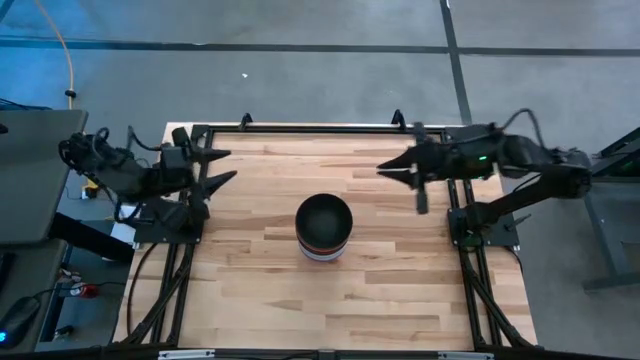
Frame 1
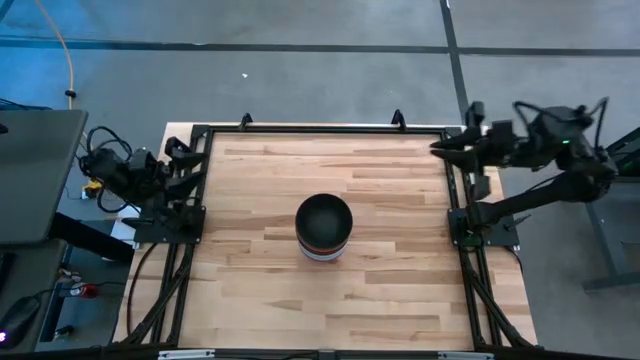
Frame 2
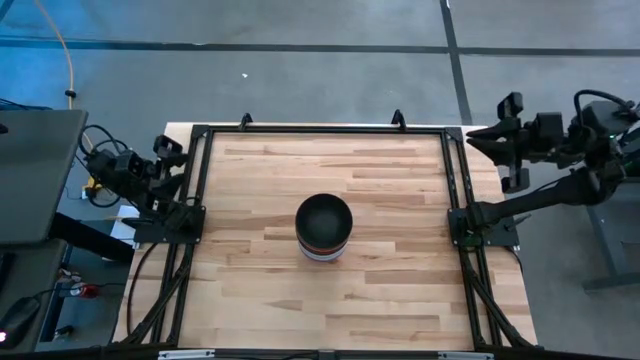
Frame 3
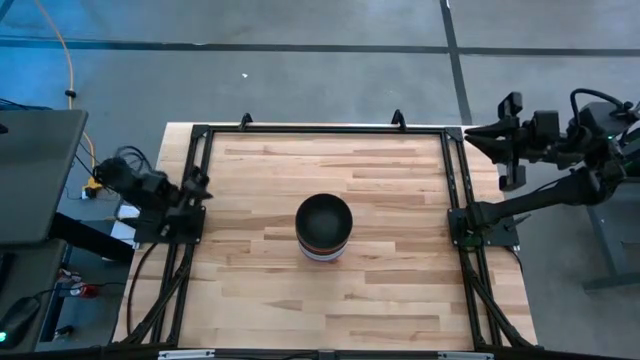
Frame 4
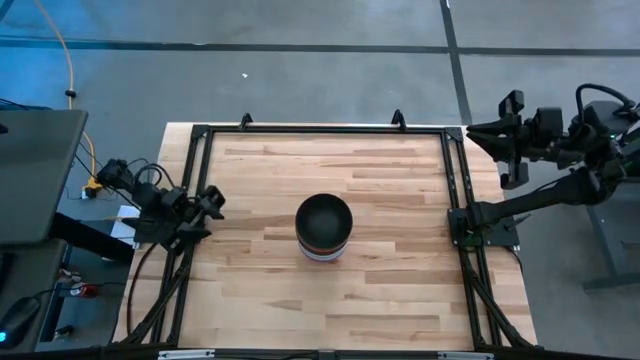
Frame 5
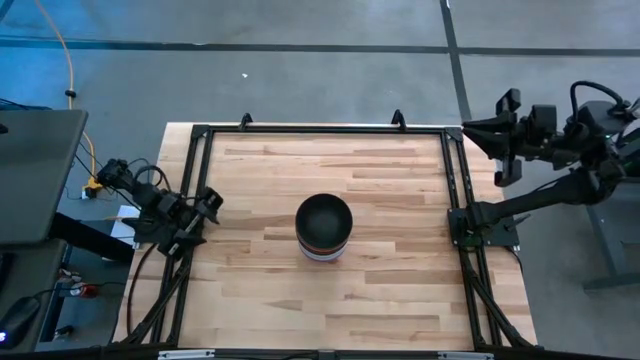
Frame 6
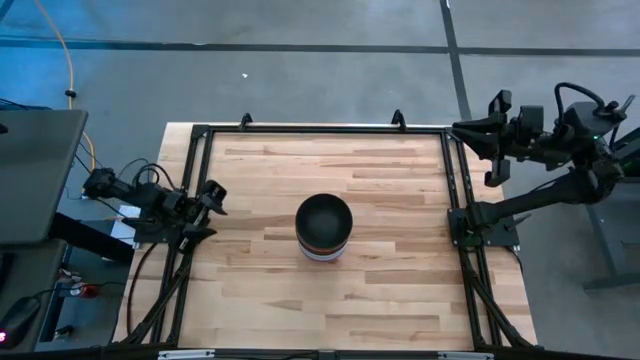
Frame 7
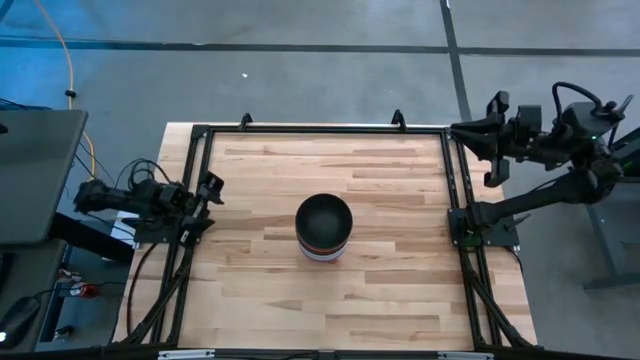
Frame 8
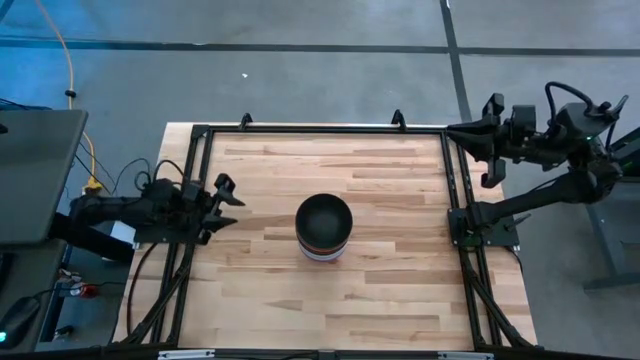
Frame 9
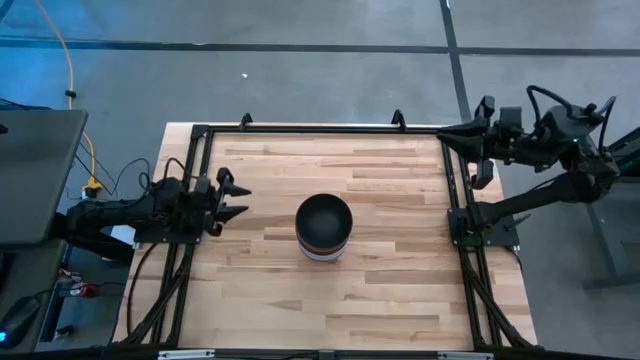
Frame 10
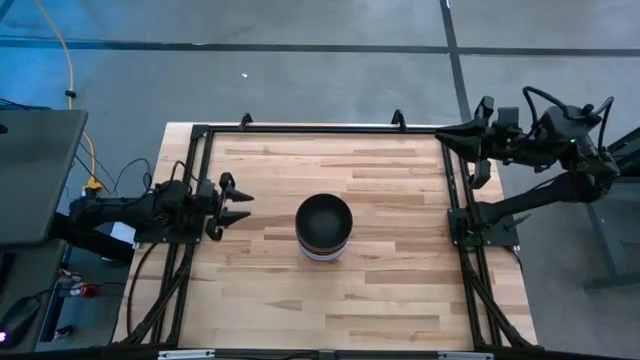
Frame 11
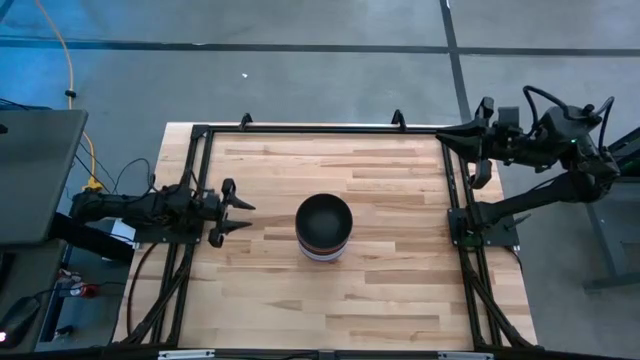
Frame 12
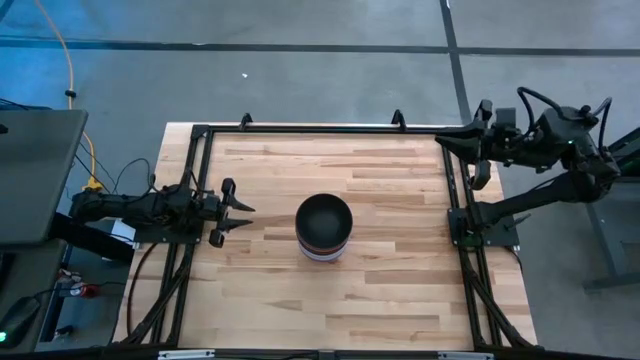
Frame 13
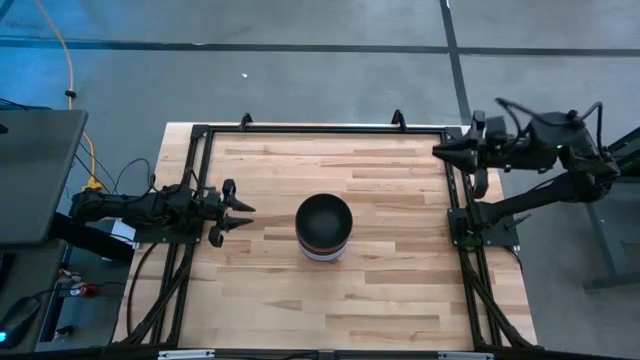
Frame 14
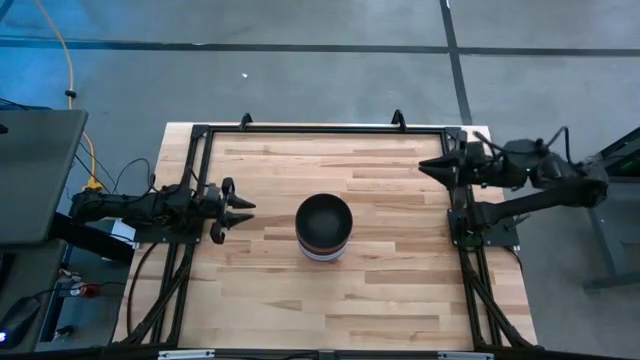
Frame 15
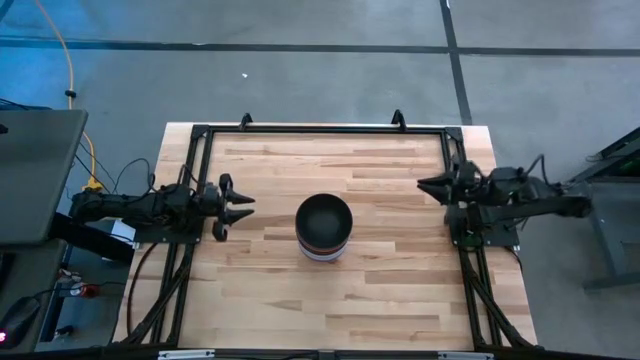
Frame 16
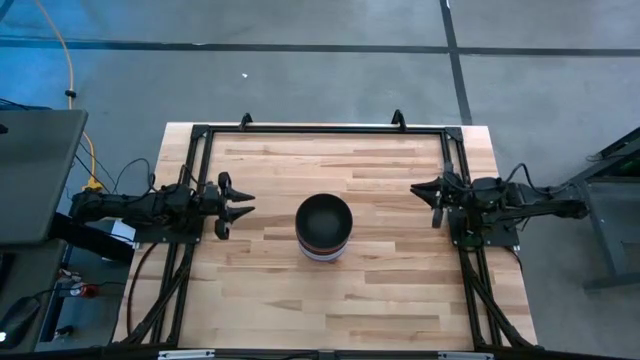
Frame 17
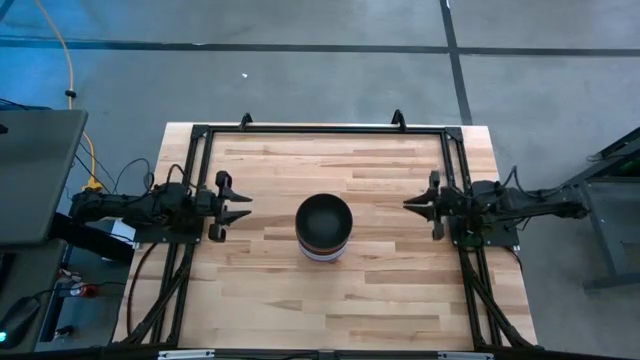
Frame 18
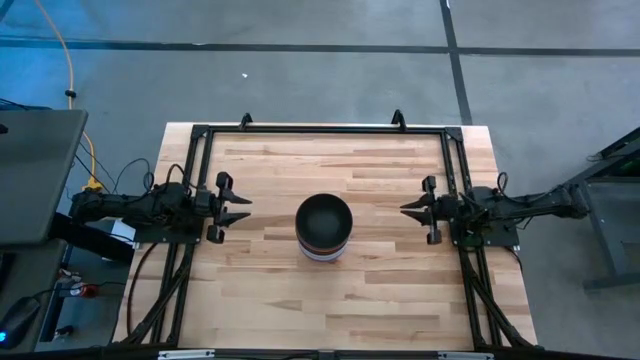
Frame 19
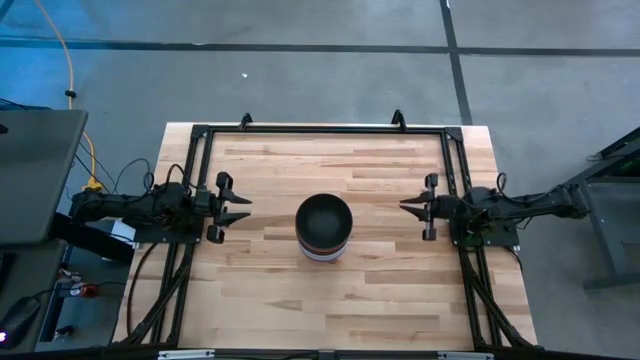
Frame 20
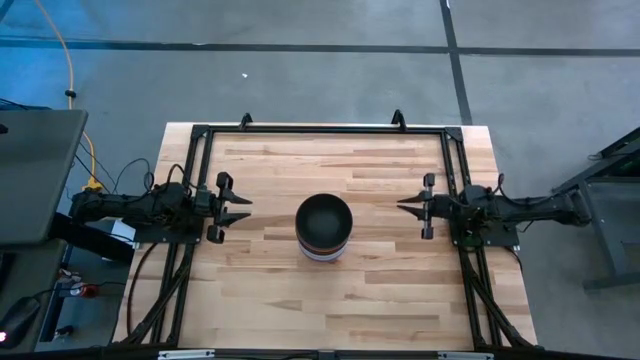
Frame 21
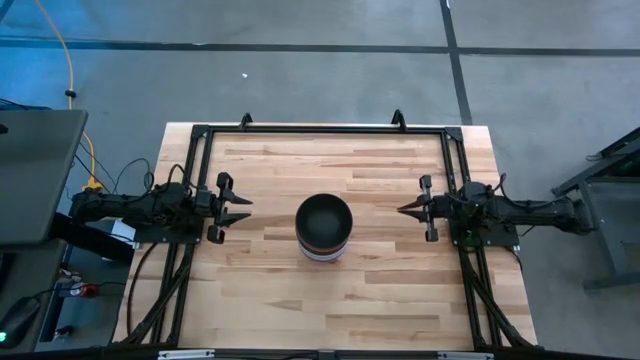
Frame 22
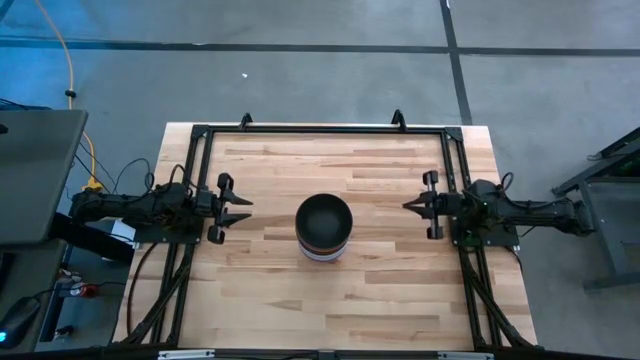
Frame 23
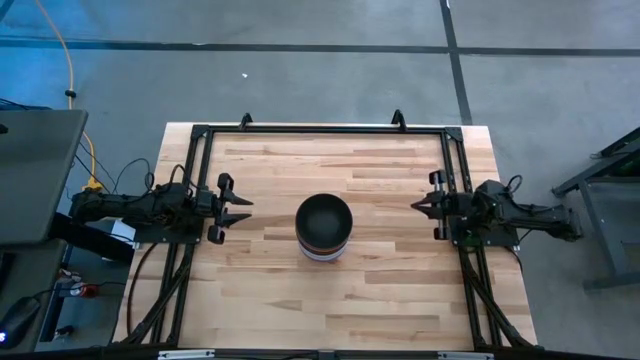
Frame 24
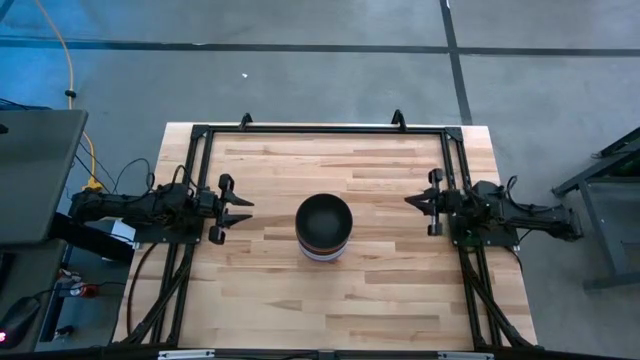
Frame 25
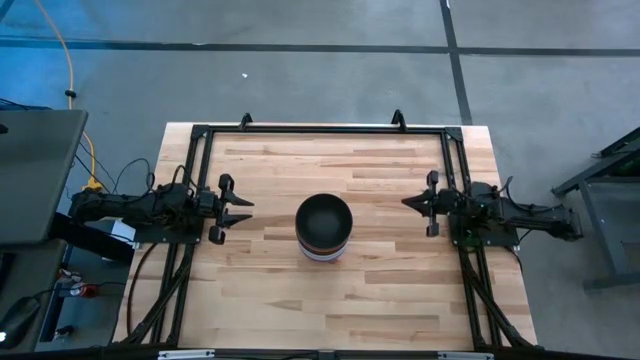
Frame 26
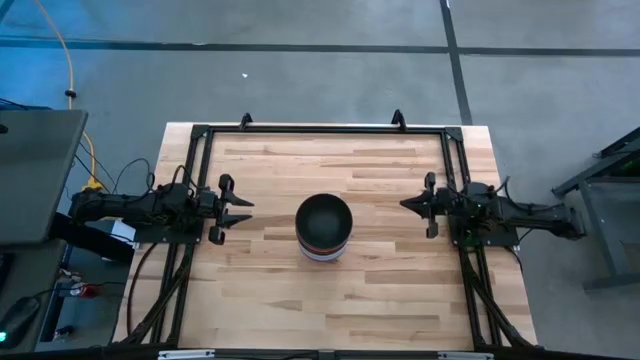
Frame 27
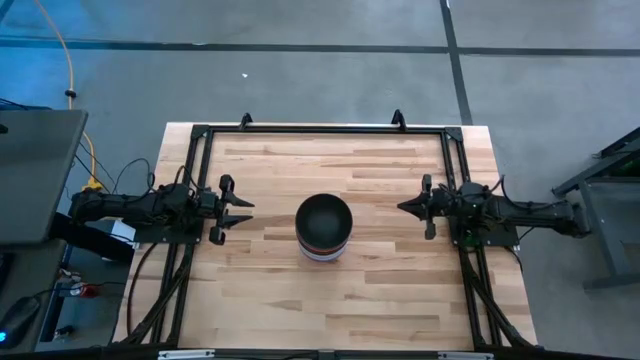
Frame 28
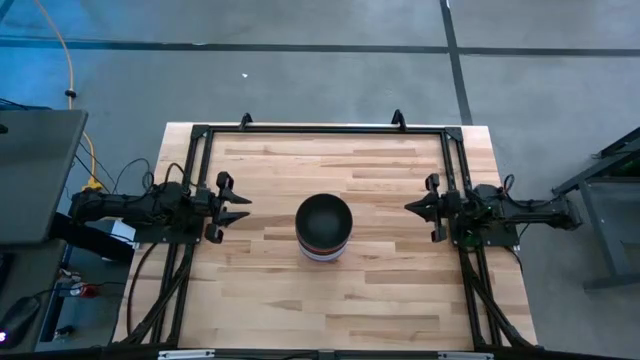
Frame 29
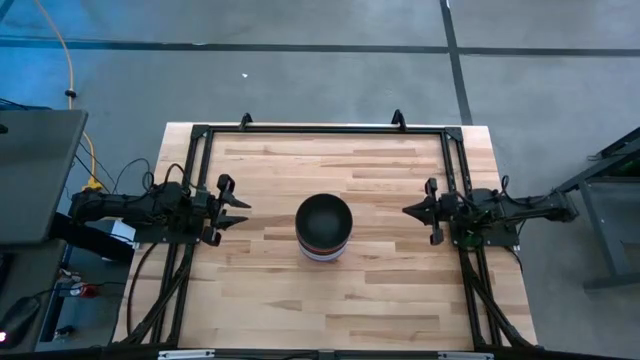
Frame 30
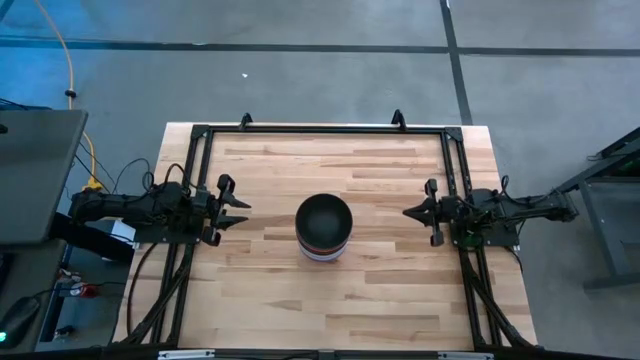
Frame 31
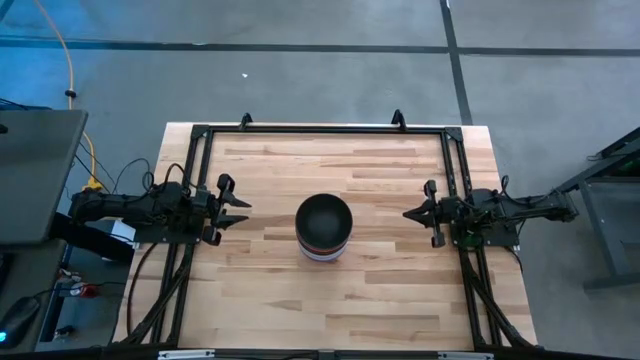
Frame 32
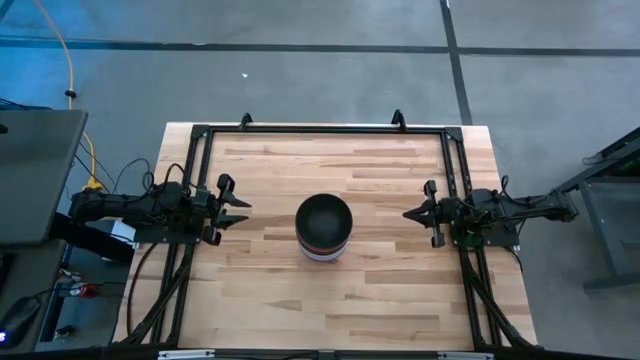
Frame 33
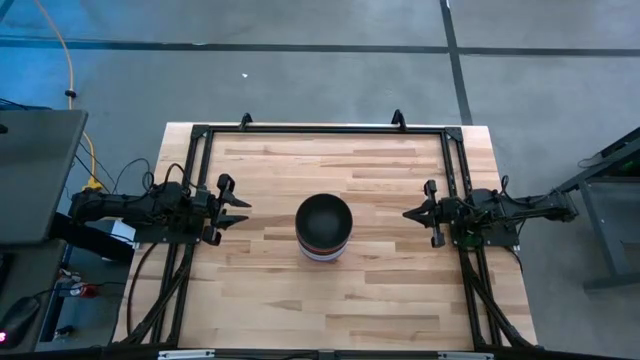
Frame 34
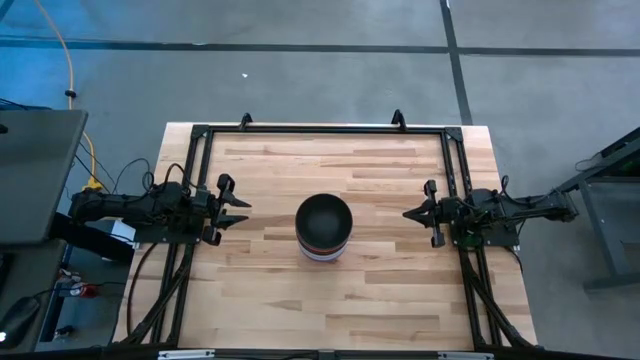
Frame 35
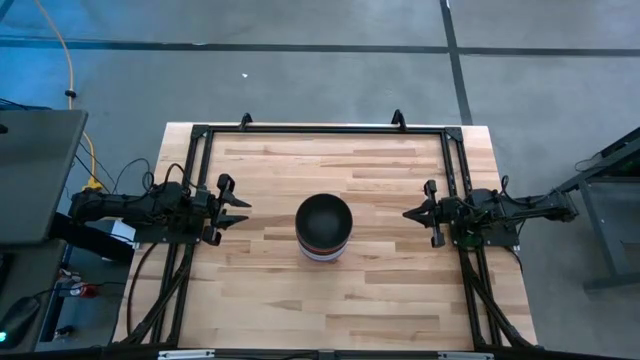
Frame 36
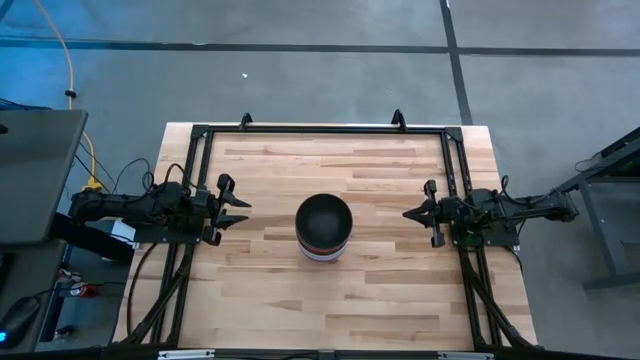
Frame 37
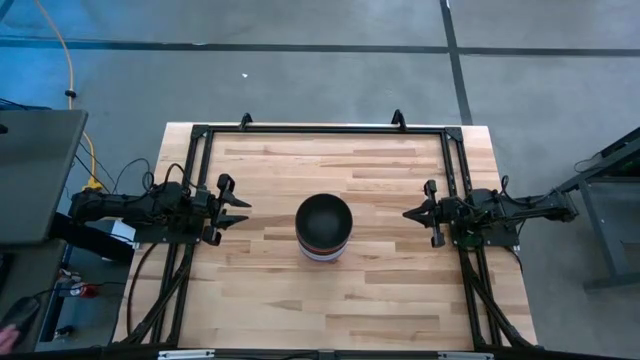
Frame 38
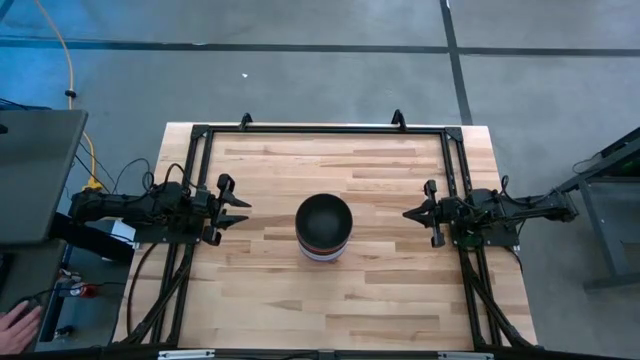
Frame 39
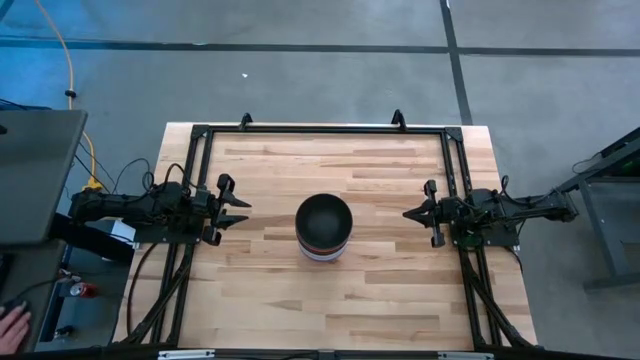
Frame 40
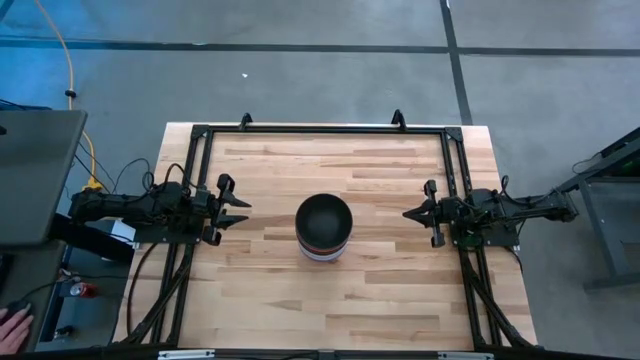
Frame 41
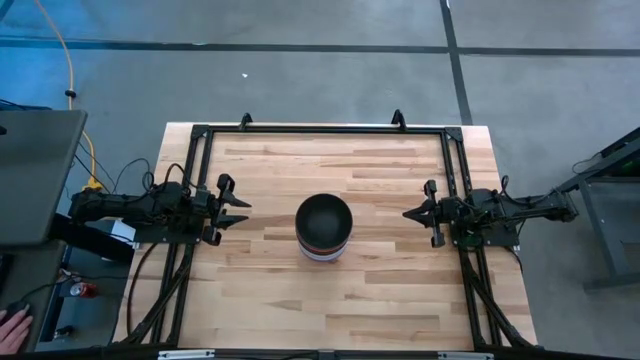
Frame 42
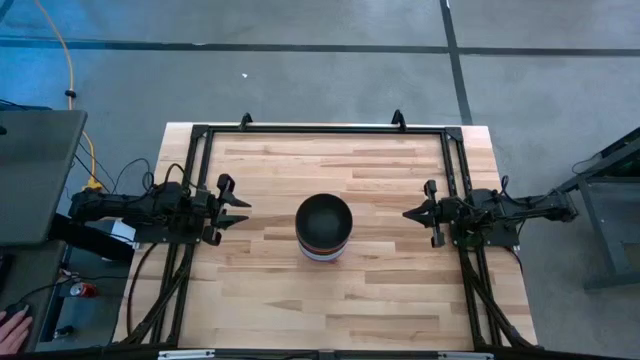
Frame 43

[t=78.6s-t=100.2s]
Task: Nest bowls inside each other
Return to Home Position
